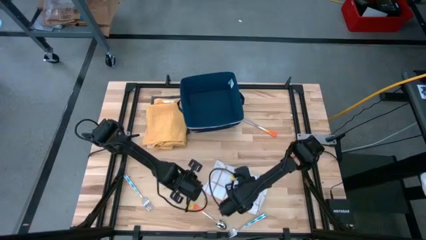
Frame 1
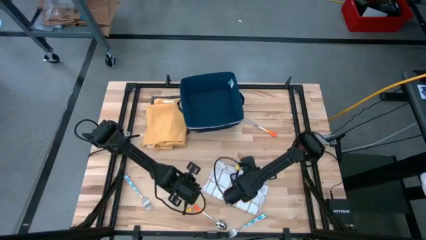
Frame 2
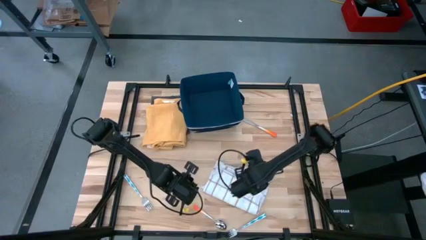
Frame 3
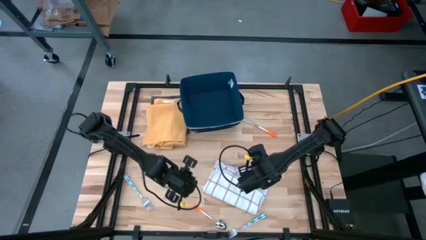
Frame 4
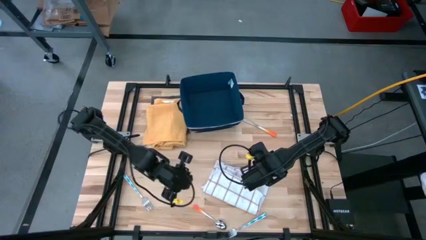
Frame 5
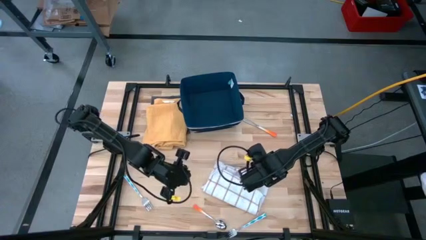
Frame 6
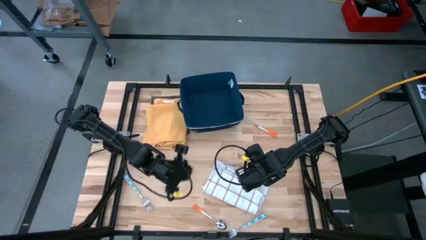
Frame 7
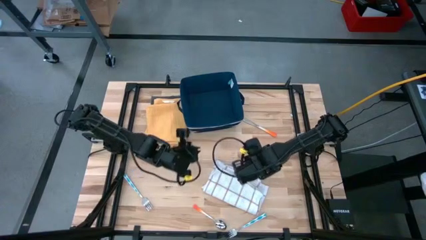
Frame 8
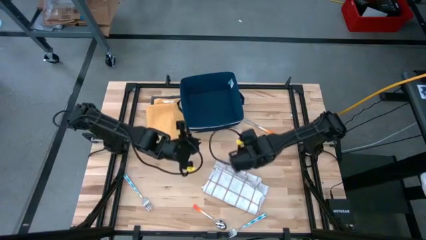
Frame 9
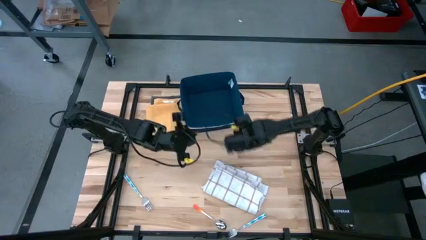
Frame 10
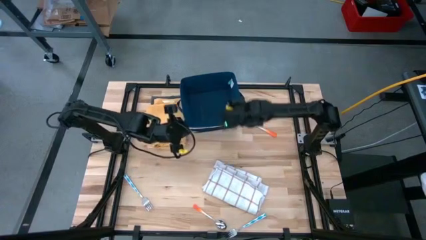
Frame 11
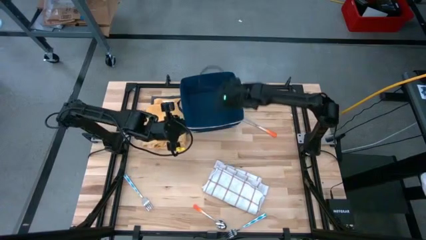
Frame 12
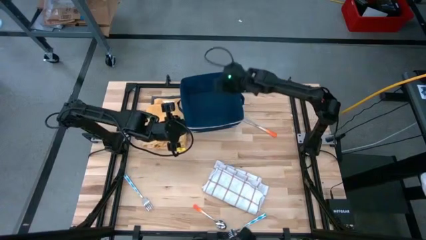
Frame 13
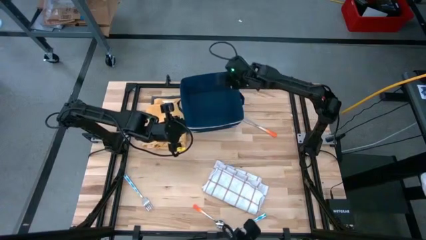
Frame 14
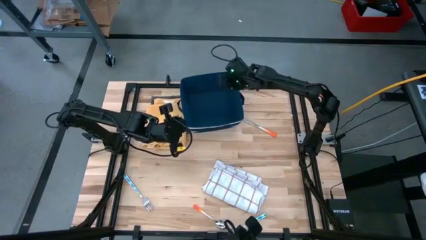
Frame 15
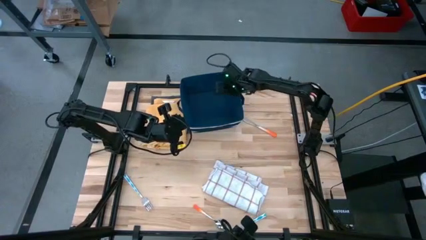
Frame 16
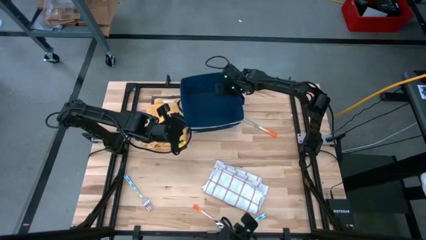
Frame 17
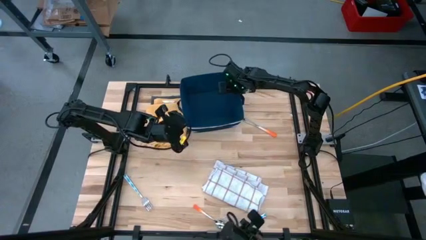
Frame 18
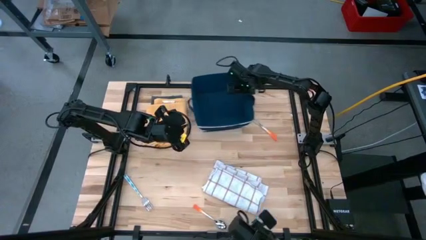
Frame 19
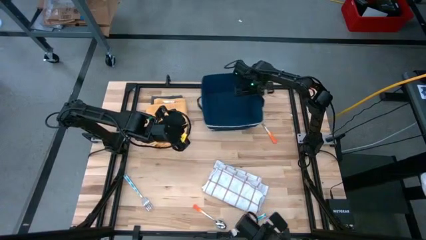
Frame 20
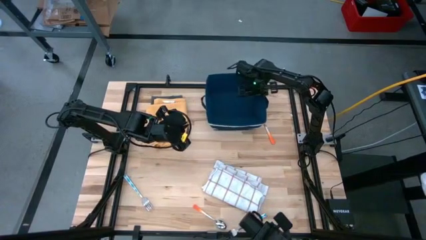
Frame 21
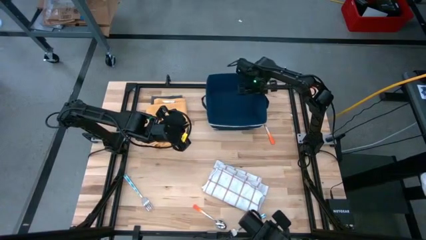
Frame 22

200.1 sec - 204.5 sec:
Task: Fold towel
Adjust the blue bin

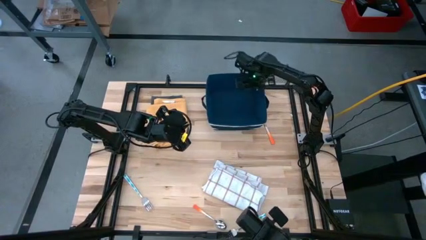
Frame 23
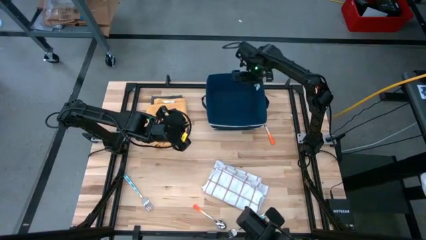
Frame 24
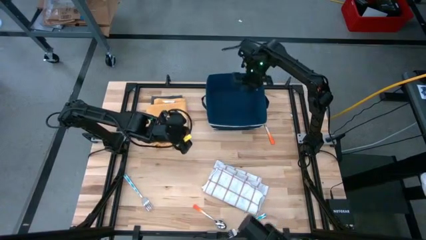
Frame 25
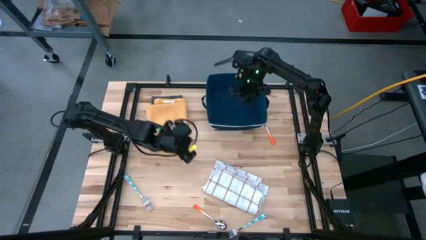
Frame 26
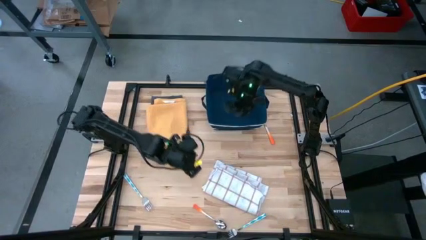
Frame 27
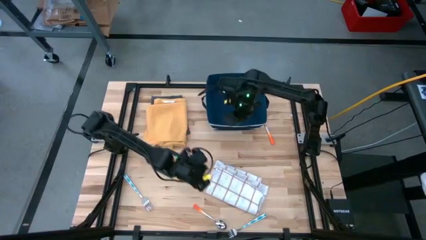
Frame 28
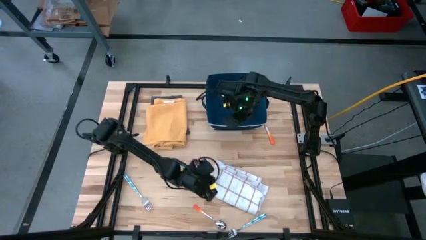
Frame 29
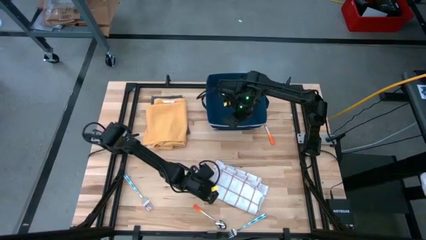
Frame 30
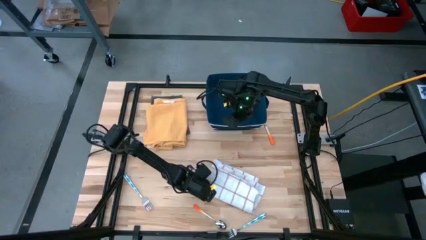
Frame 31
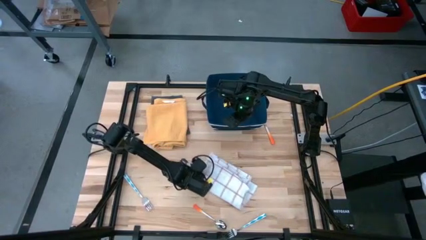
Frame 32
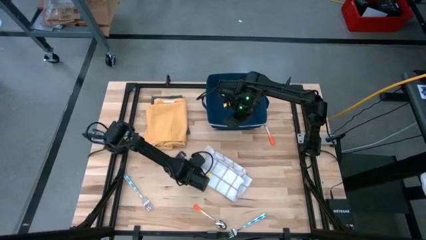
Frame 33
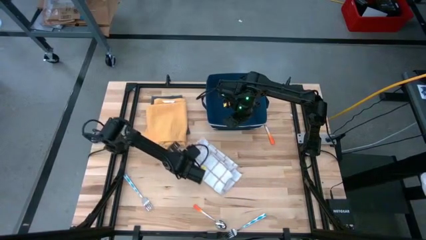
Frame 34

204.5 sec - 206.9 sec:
Adjust the white pattern towel

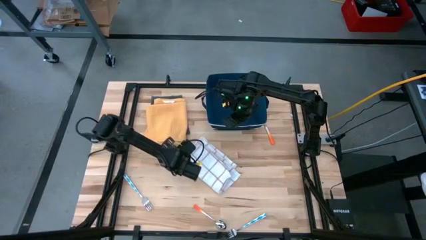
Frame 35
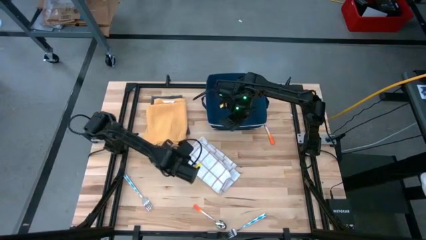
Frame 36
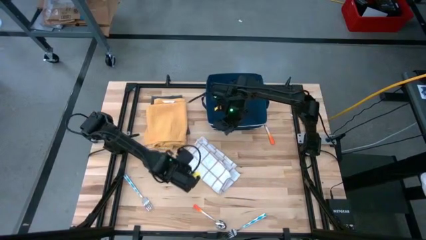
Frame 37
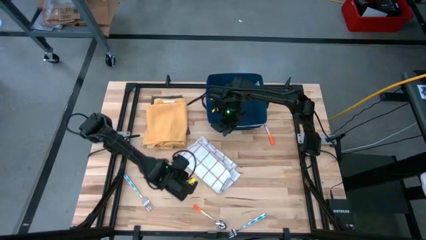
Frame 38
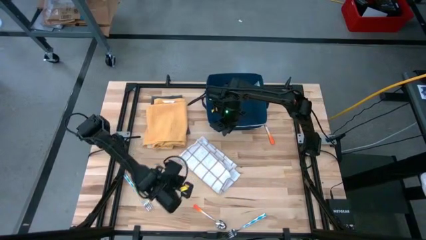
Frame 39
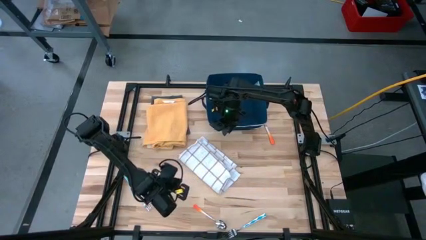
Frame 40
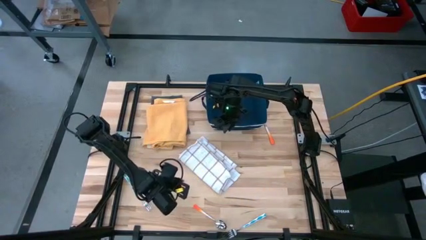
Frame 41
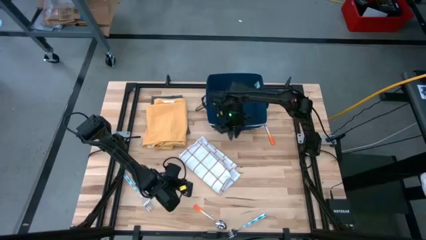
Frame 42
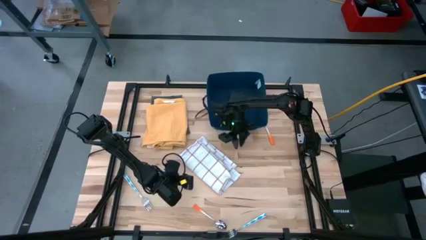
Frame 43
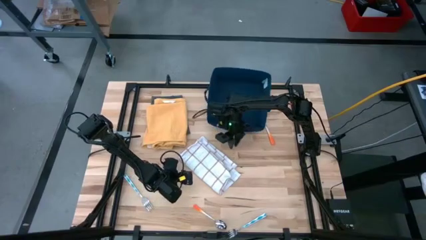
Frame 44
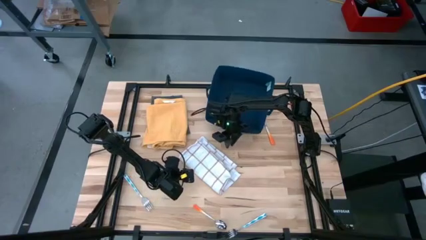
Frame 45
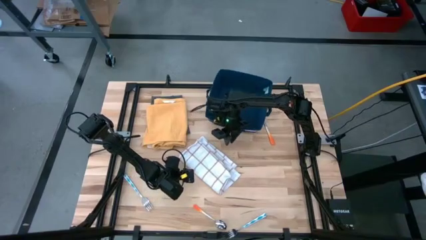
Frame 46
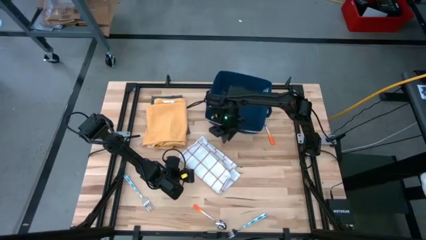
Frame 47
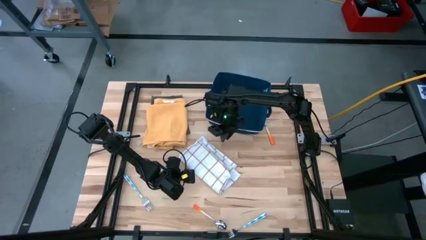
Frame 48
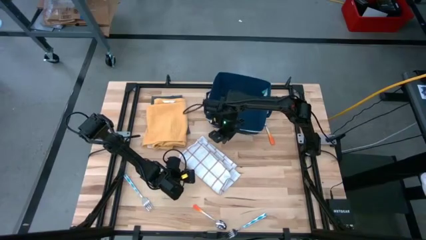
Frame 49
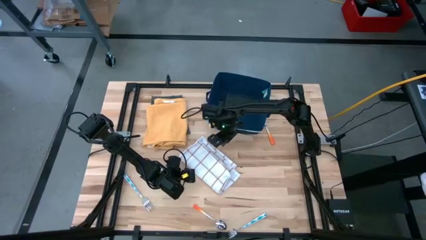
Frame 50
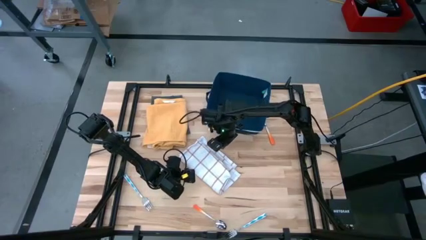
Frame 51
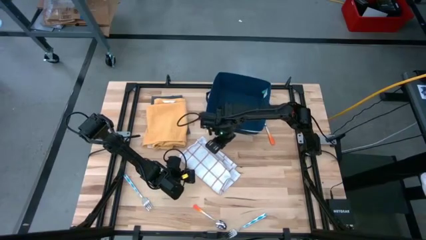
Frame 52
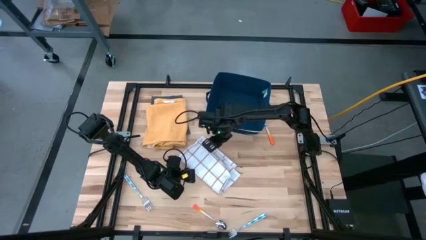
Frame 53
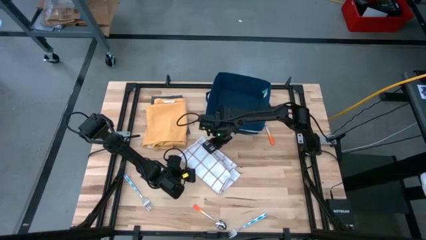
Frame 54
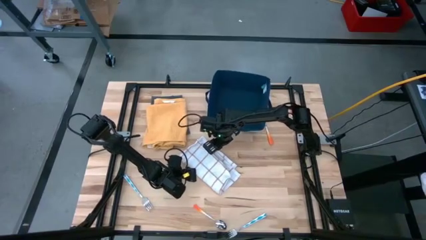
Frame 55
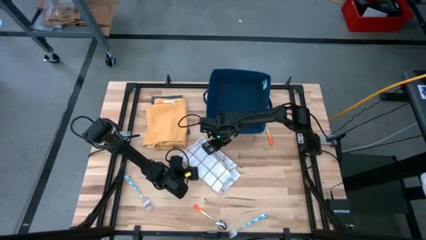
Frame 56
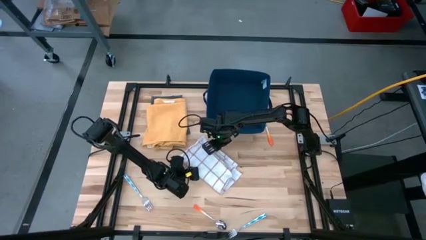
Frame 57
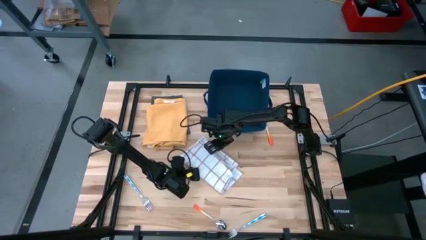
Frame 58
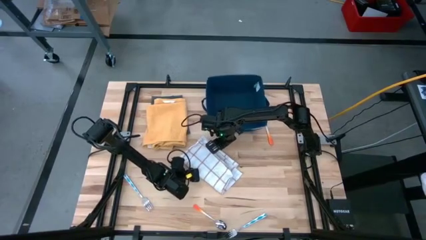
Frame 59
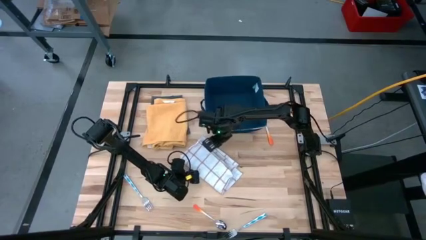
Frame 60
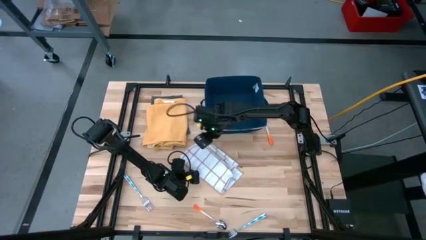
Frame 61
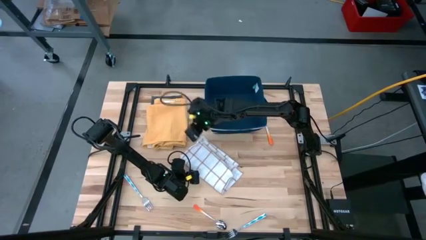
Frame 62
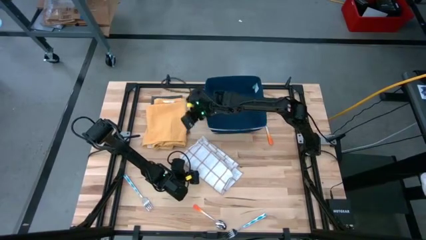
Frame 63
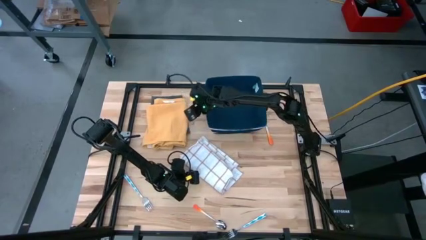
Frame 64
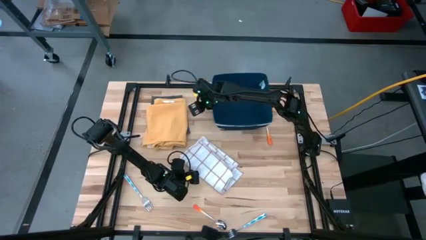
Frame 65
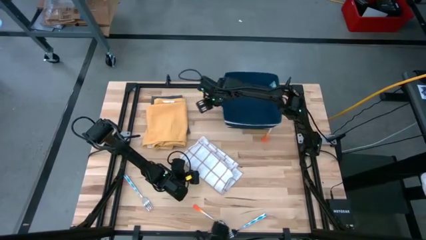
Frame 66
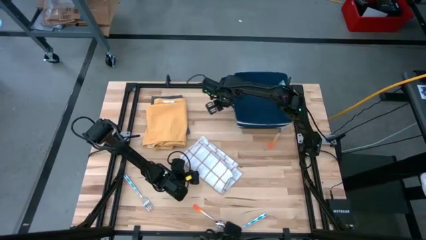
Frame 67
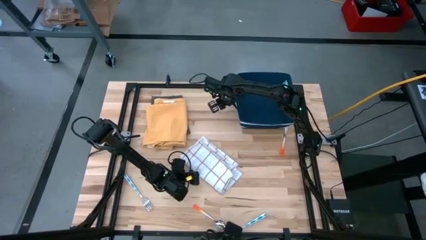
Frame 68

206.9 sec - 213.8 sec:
Adjust the blue bin

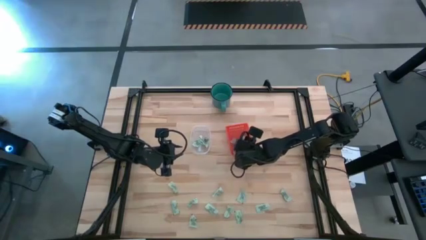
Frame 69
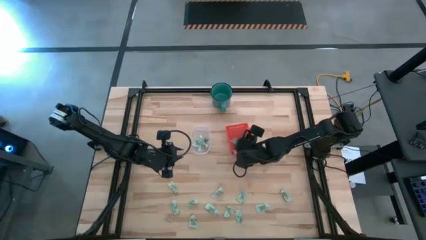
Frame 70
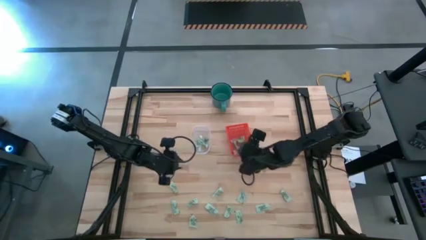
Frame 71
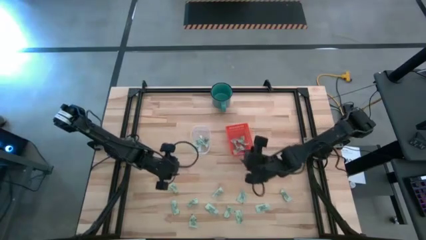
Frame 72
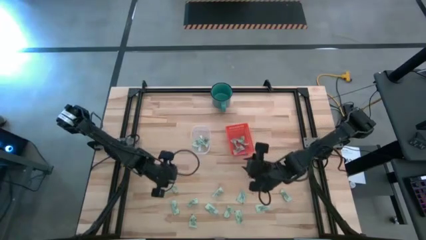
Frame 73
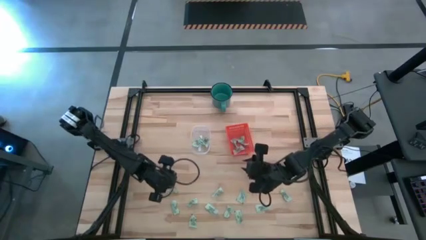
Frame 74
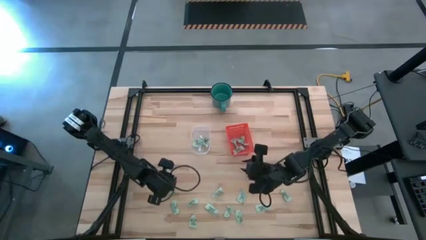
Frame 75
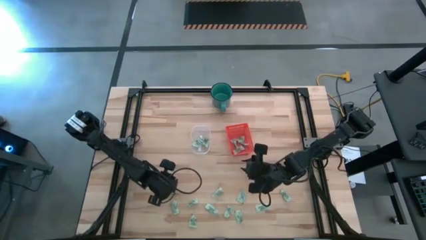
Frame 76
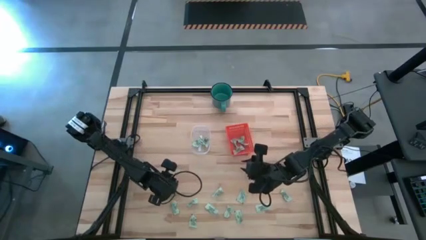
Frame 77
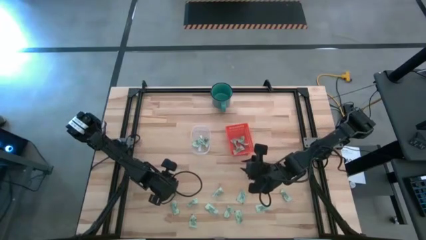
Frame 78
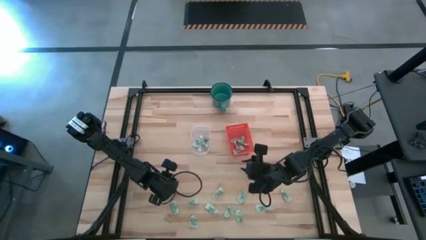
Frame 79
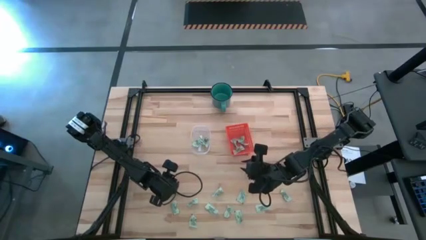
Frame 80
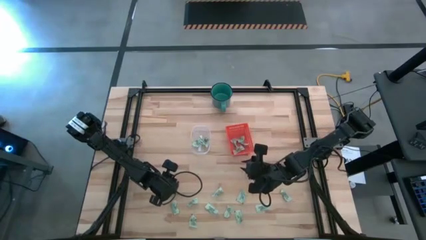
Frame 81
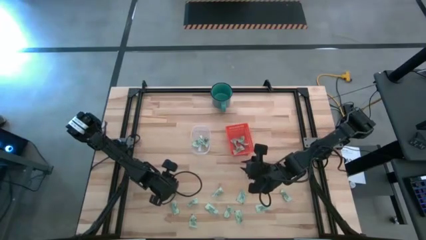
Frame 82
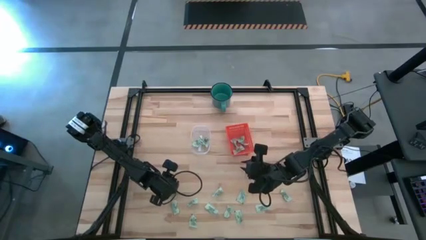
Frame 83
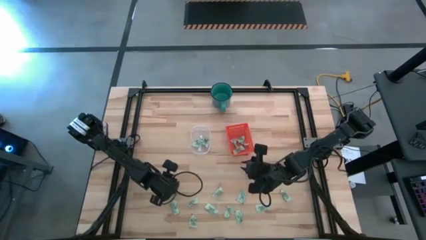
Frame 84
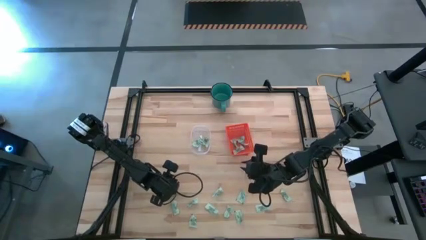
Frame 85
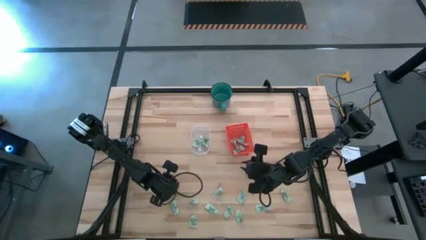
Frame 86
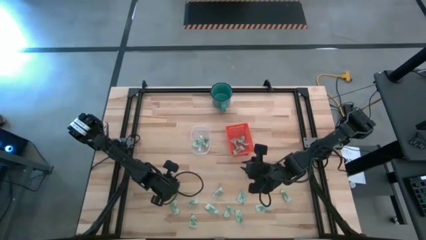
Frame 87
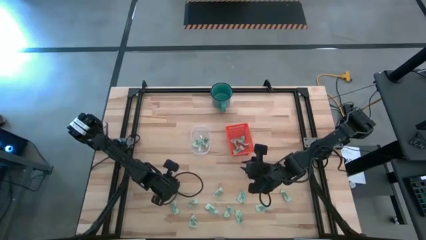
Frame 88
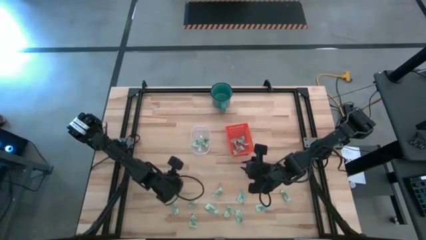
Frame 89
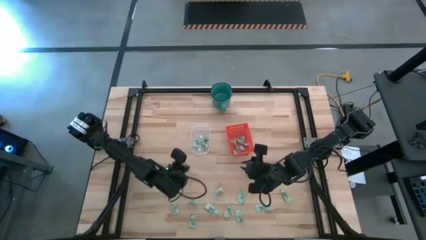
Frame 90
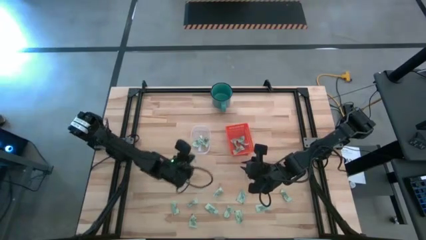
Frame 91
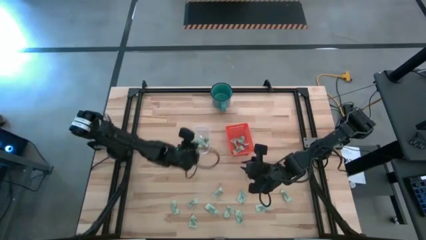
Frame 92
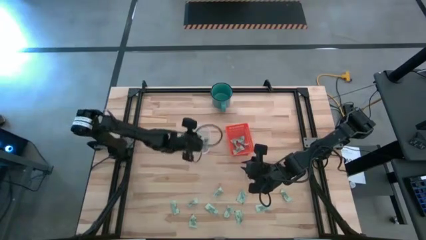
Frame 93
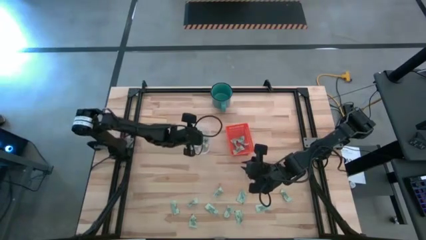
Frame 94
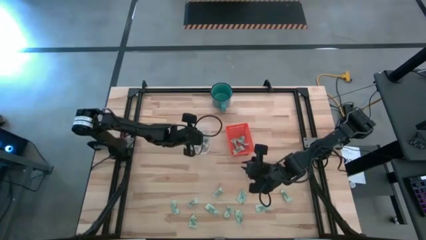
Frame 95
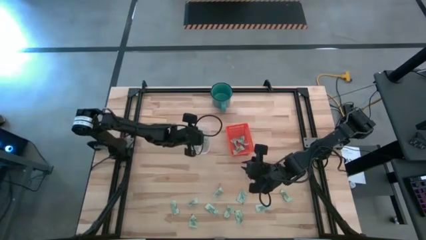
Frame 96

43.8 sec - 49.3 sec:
Task: Pick and place items into bin
Put the stevia packet into the transparent bin
